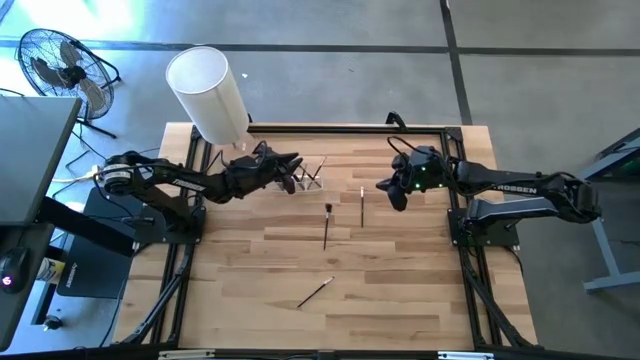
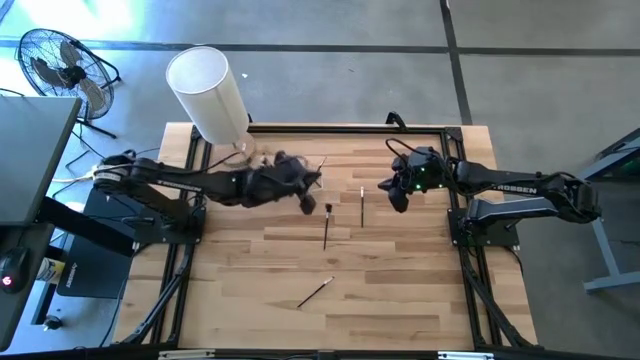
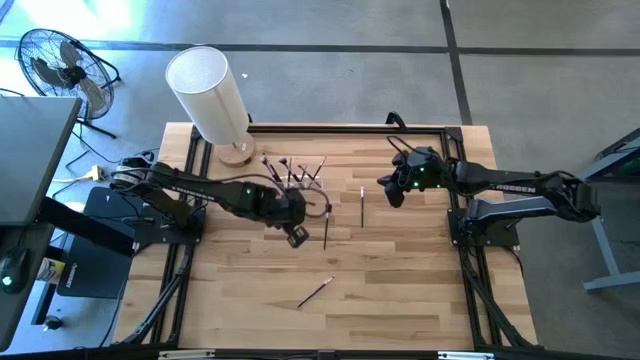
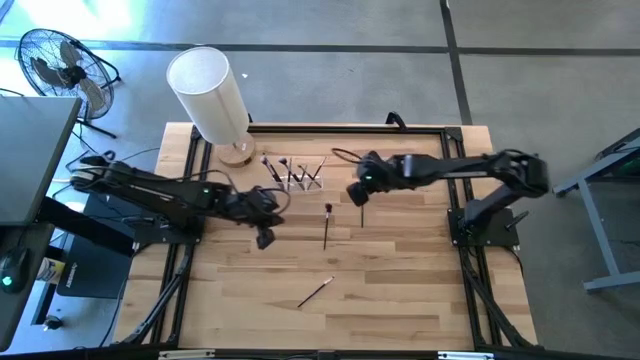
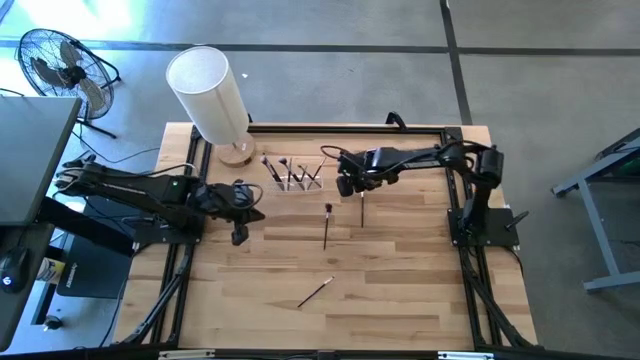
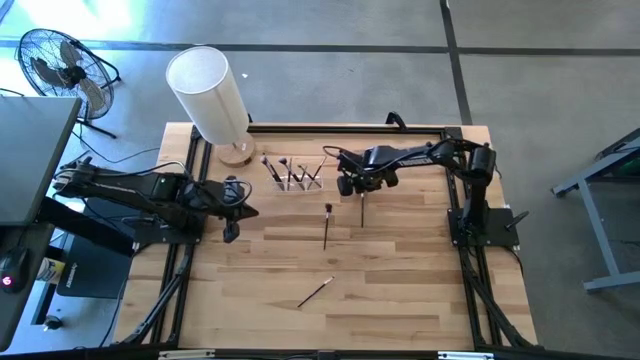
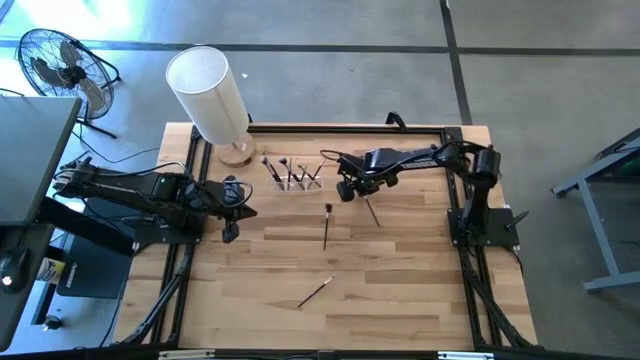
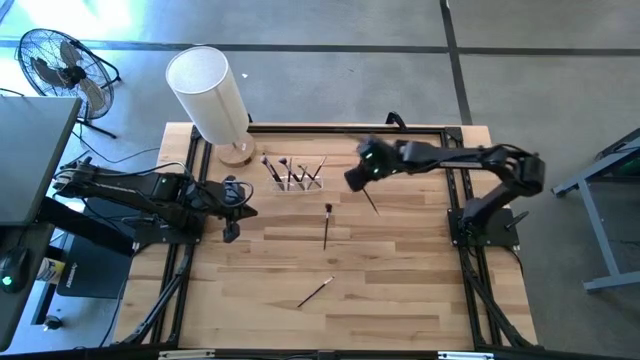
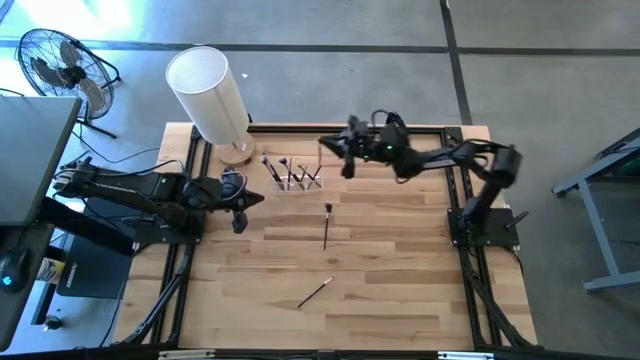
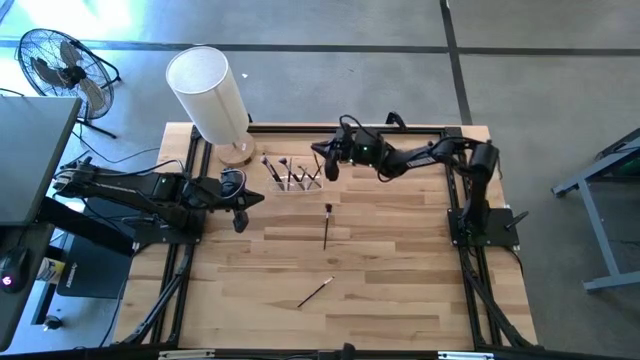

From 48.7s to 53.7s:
Task: Pick & Place Makeup Supplies
Put the black makeup brush into the transparent organizer

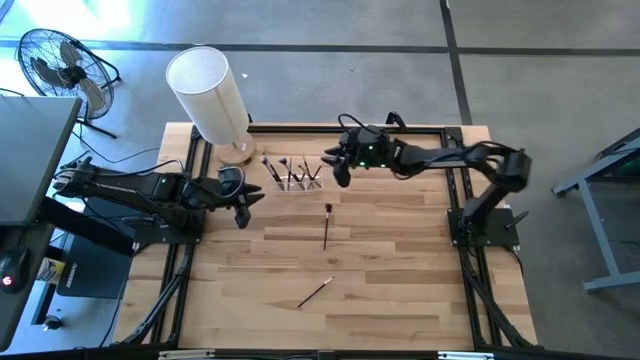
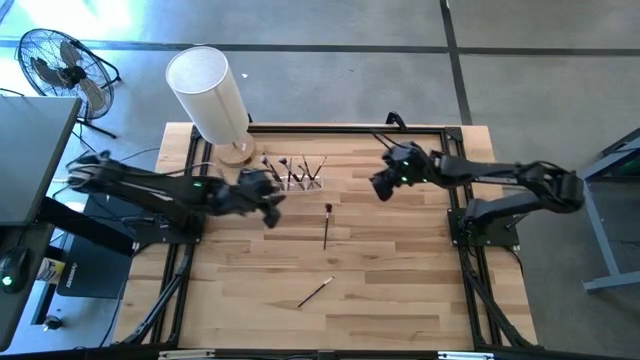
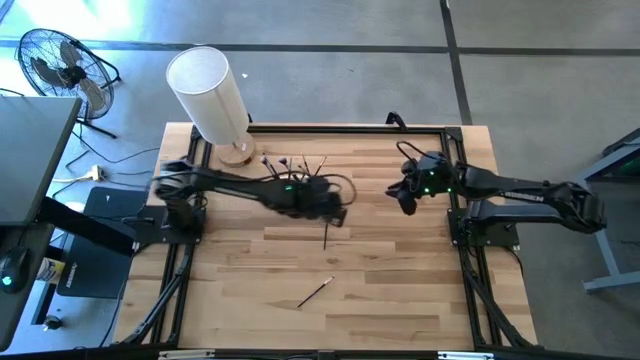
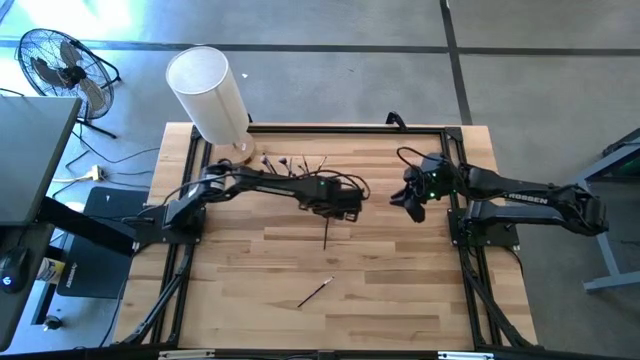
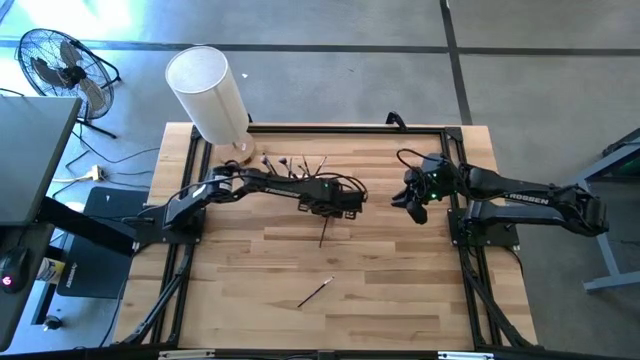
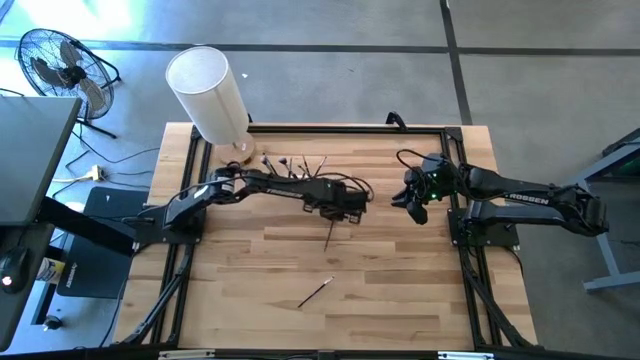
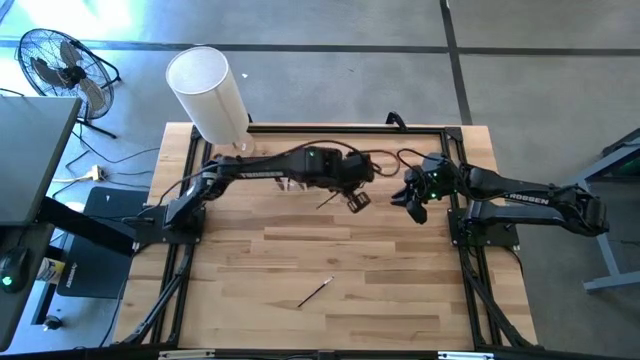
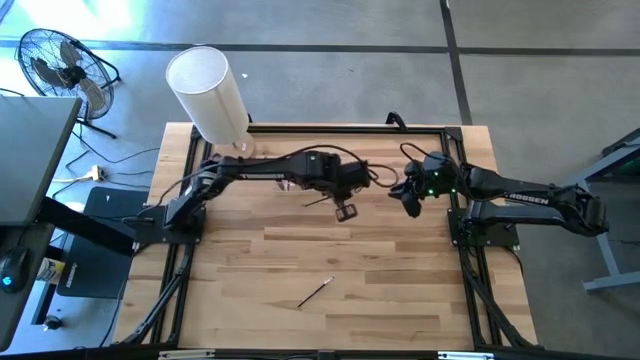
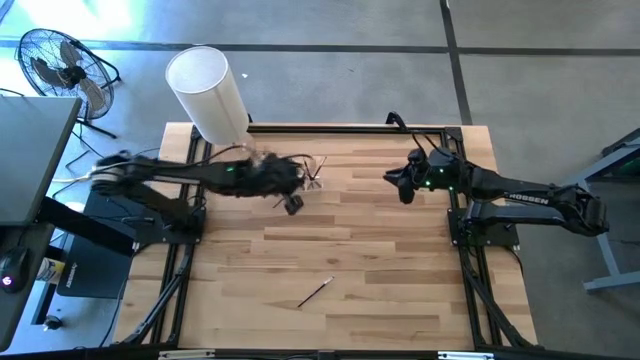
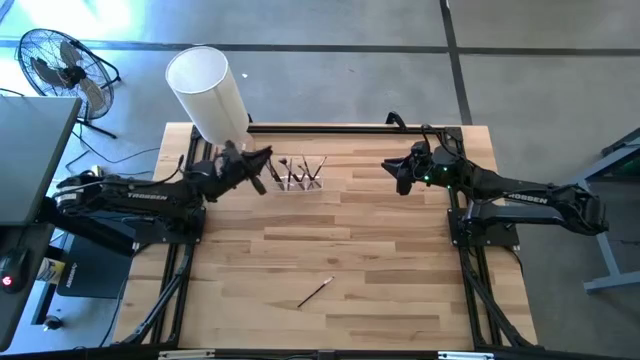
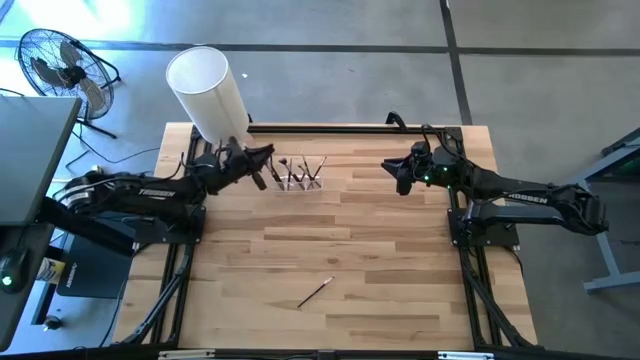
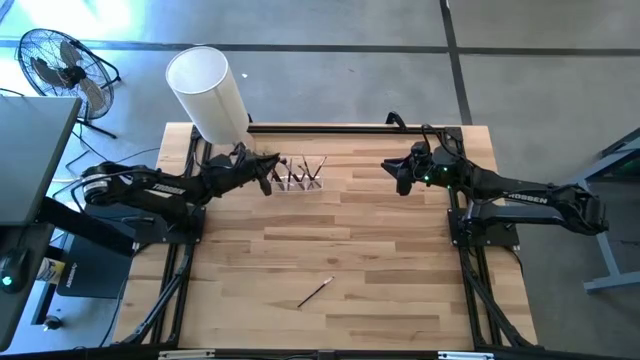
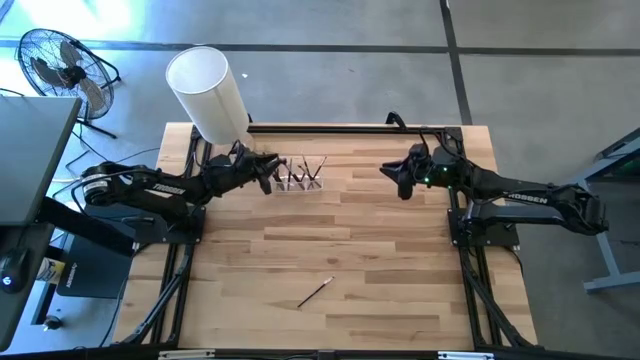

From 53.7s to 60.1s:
Put the black makeup brush into the transparent organizer

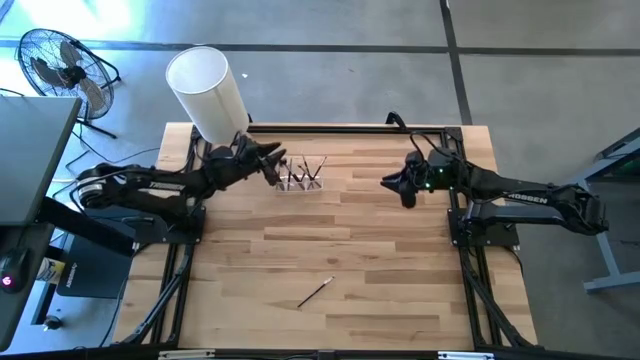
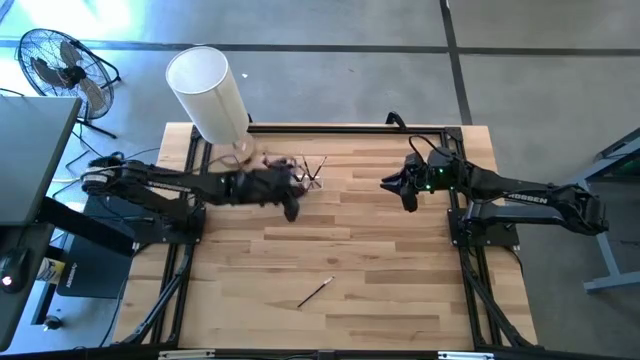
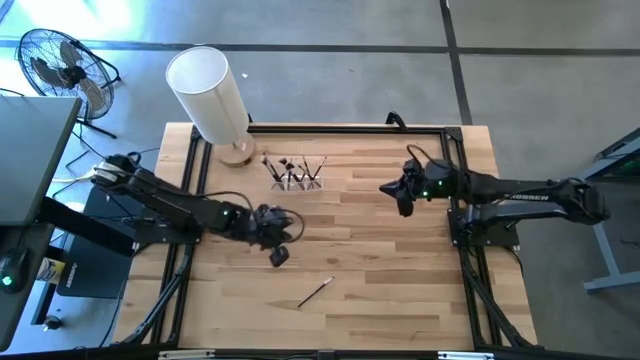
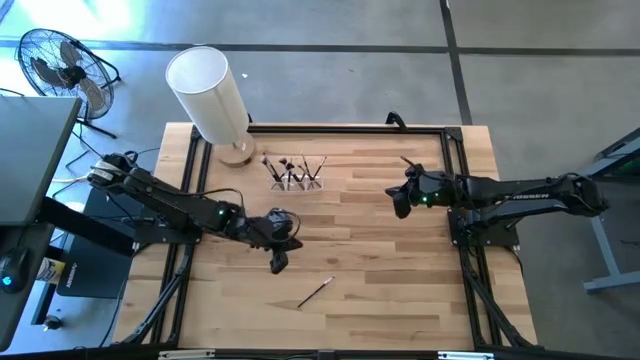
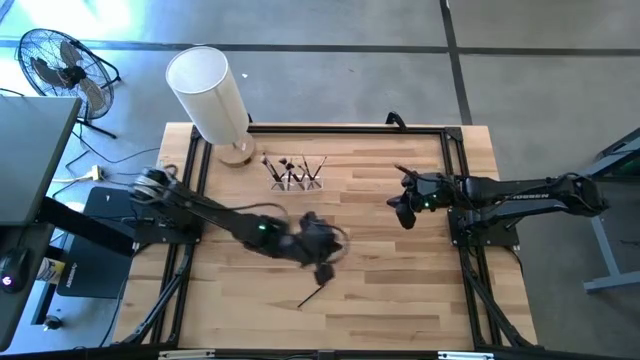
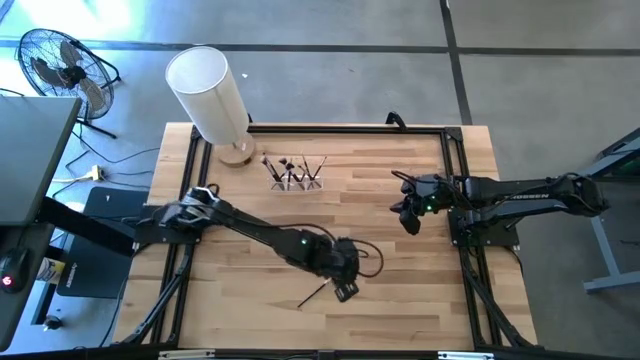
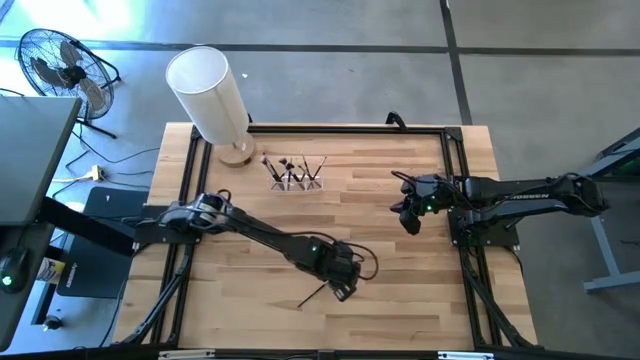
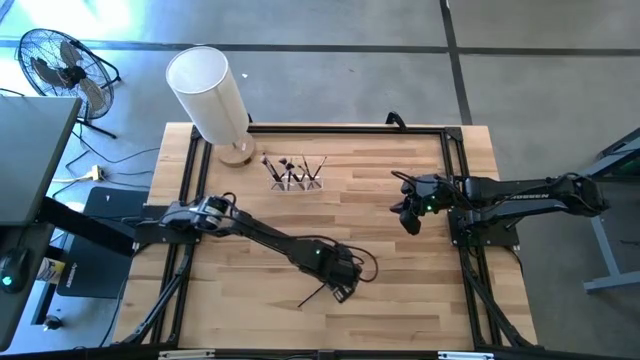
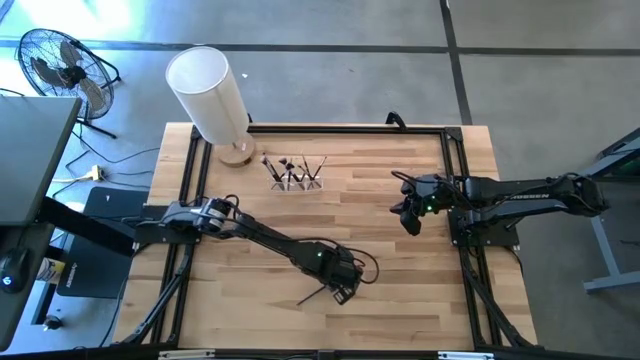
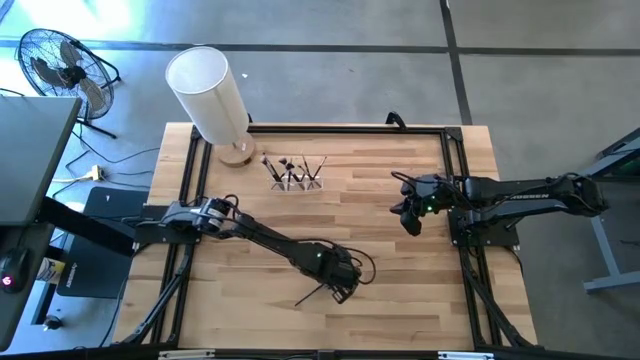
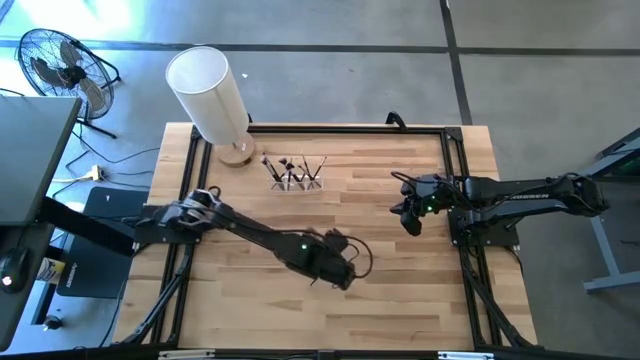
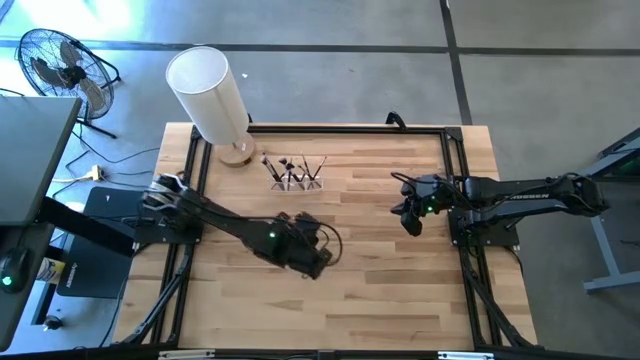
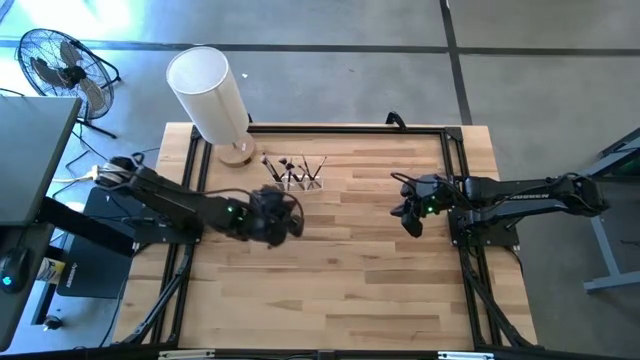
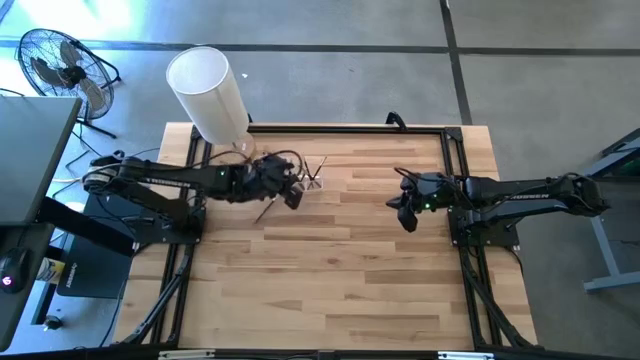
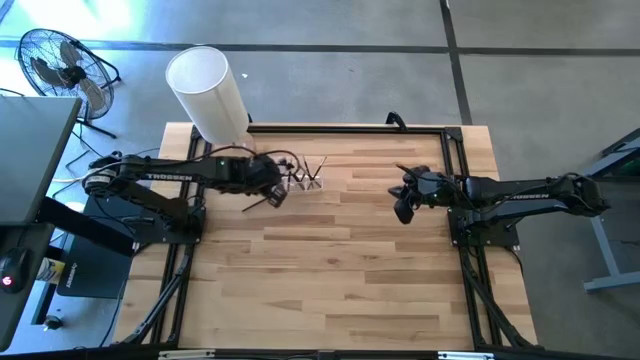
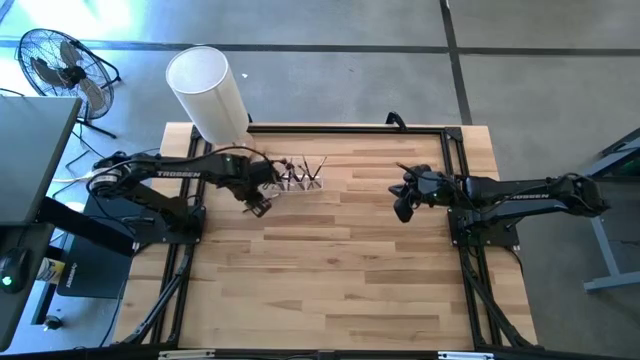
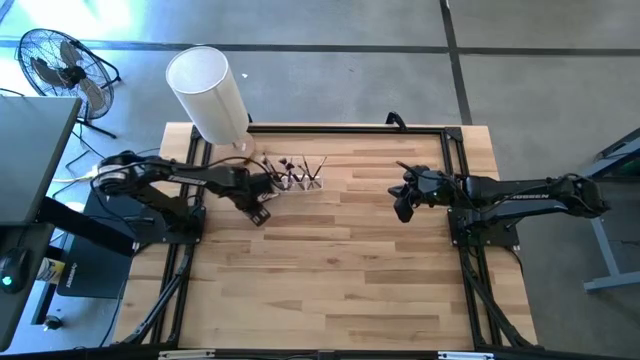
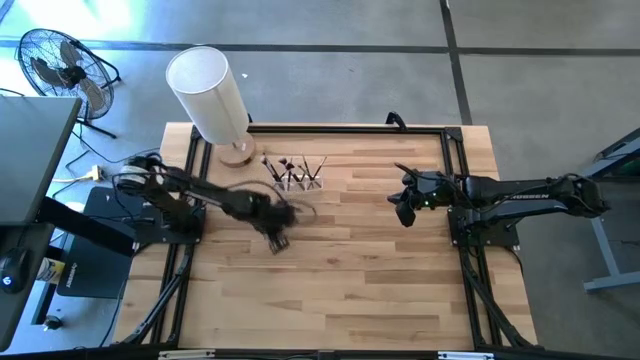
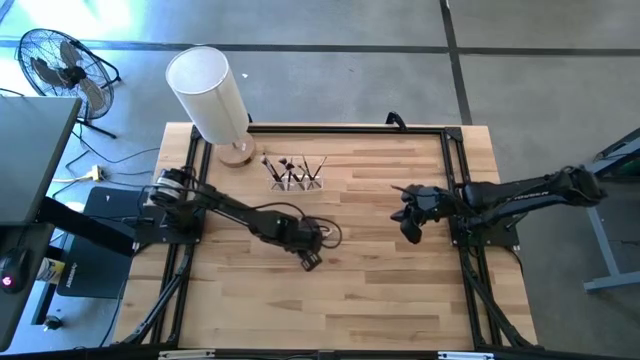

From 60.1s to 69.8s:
Put the black makeup brush into the transparent organizer

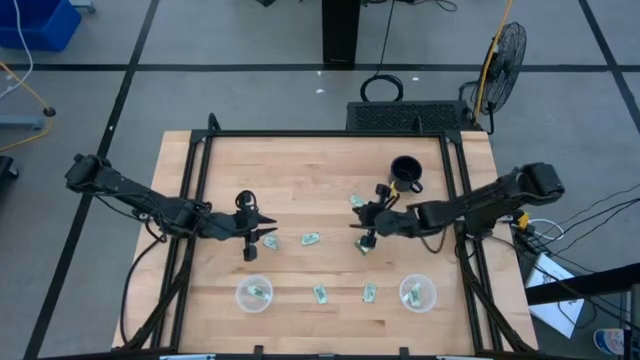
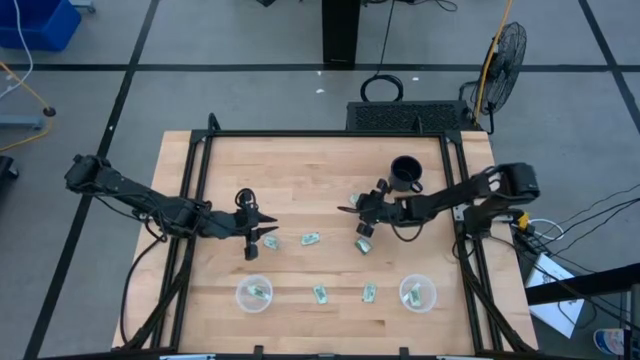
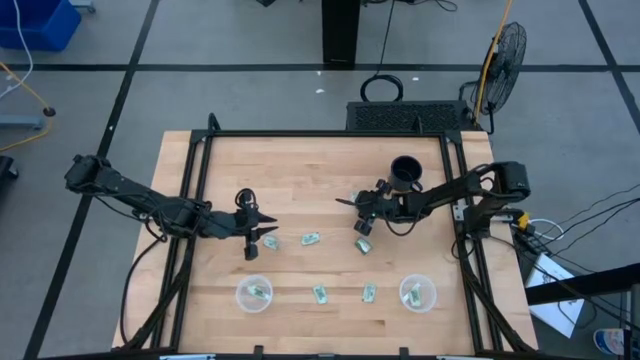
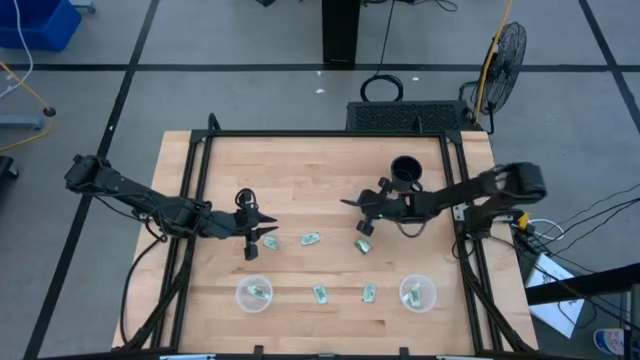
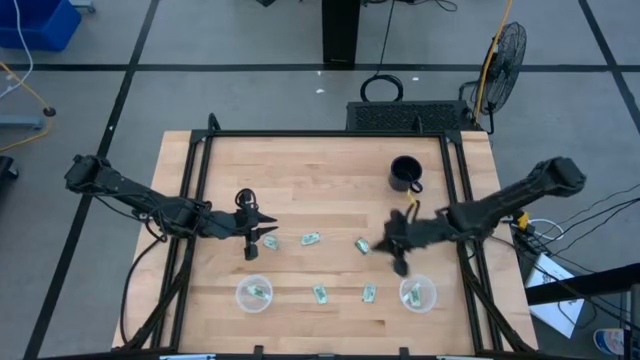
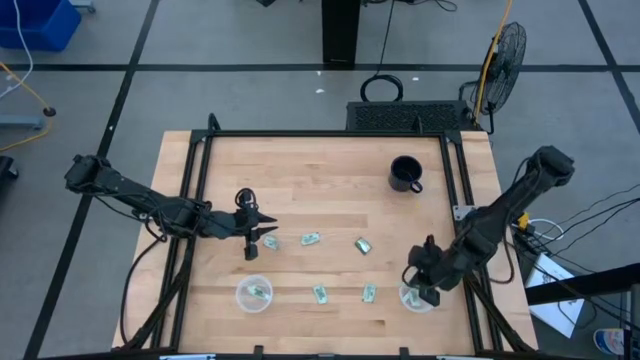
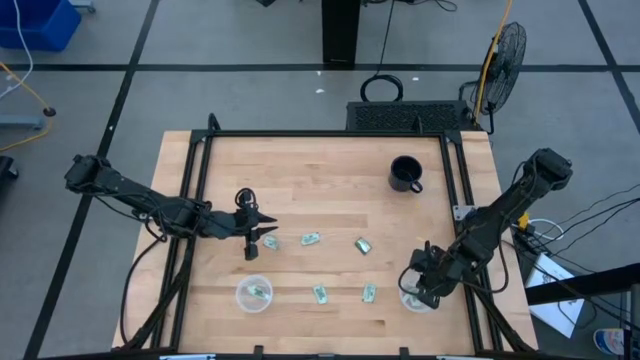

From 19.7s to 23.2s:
Task: Pick and place Stevia / Truvia into bins
Put the stevia packet into the right transparent container
